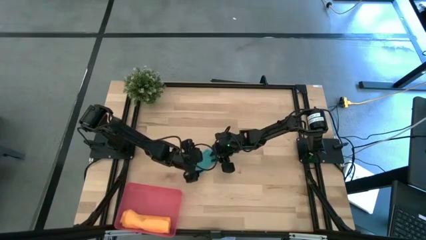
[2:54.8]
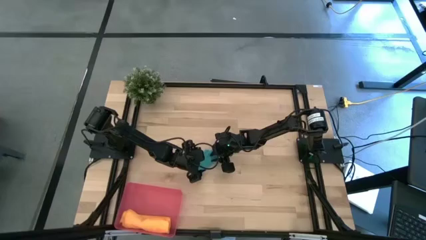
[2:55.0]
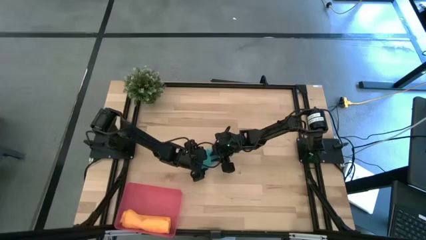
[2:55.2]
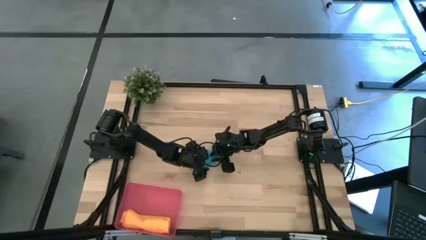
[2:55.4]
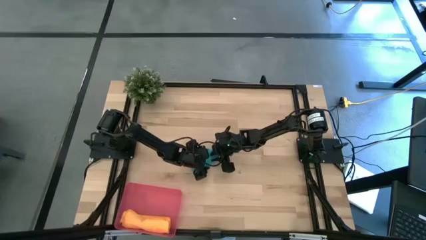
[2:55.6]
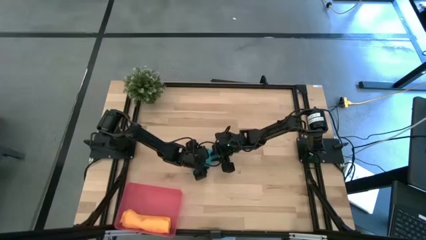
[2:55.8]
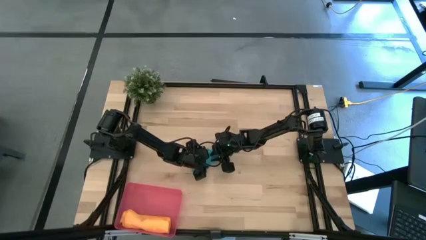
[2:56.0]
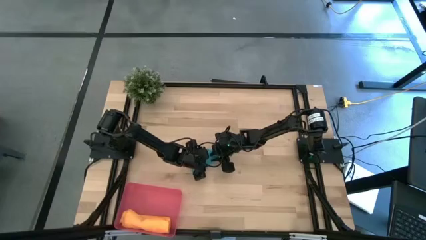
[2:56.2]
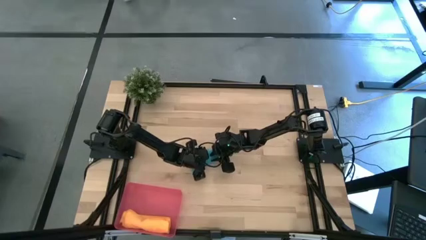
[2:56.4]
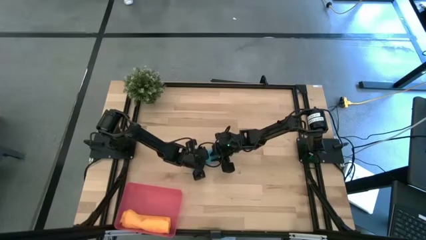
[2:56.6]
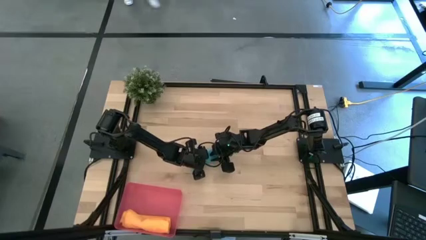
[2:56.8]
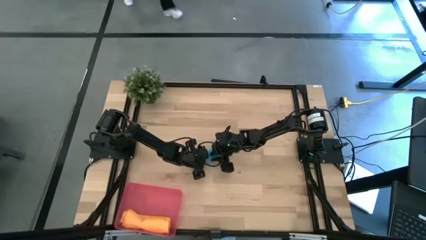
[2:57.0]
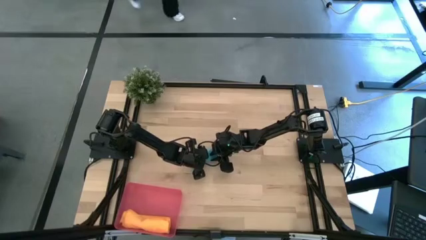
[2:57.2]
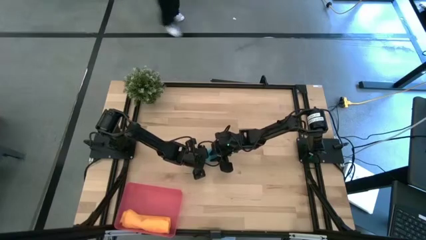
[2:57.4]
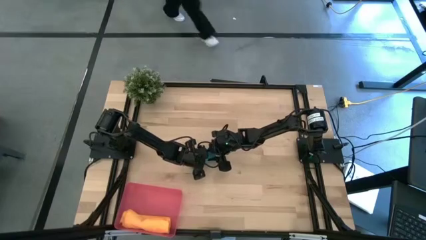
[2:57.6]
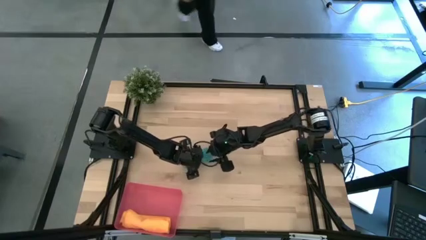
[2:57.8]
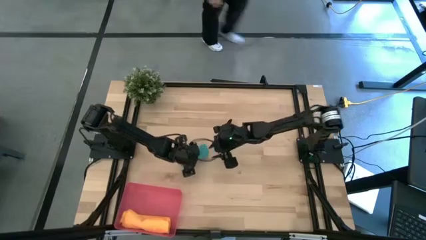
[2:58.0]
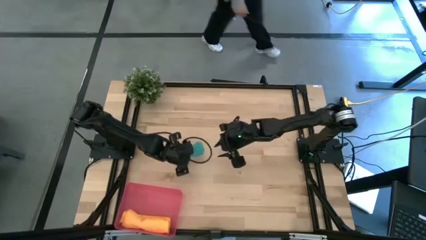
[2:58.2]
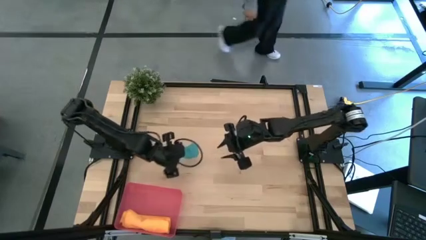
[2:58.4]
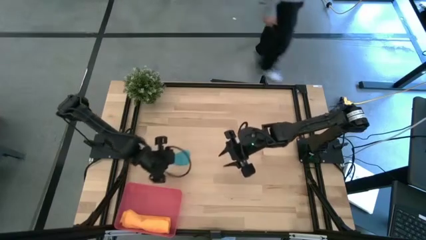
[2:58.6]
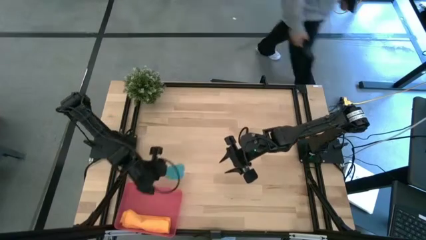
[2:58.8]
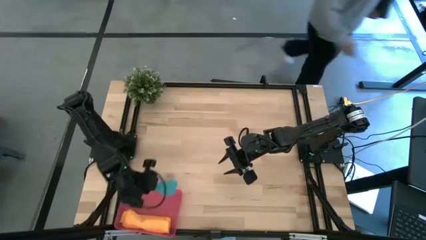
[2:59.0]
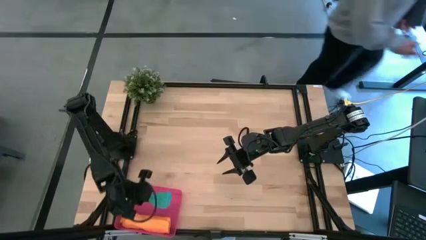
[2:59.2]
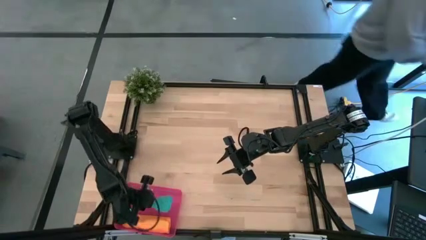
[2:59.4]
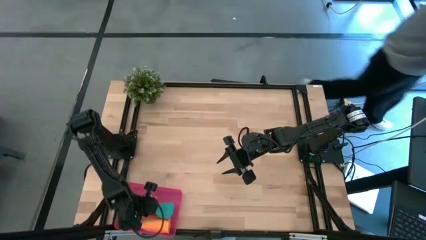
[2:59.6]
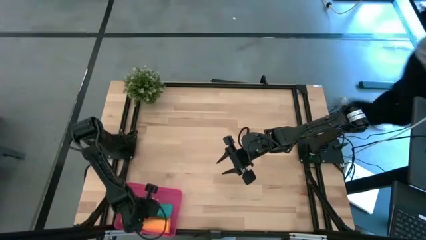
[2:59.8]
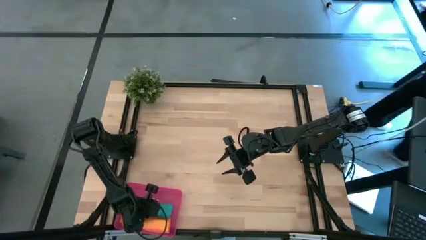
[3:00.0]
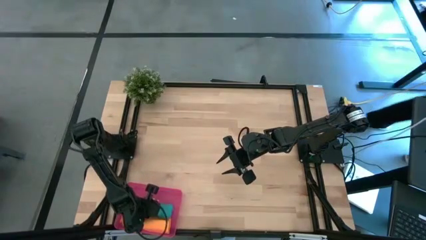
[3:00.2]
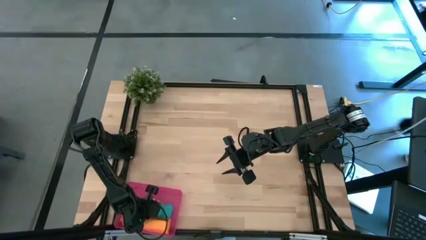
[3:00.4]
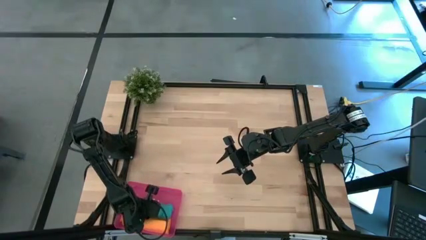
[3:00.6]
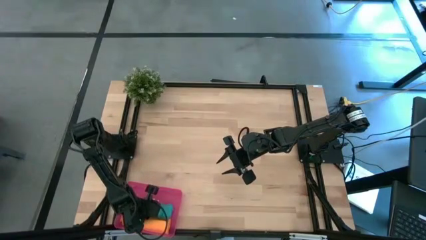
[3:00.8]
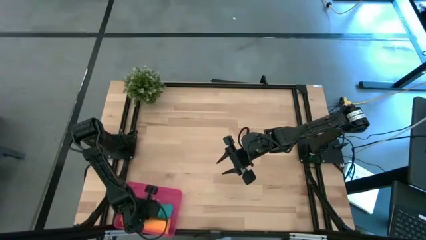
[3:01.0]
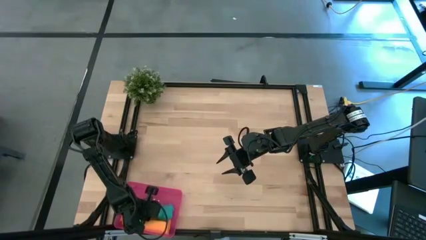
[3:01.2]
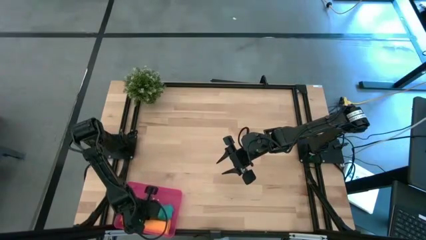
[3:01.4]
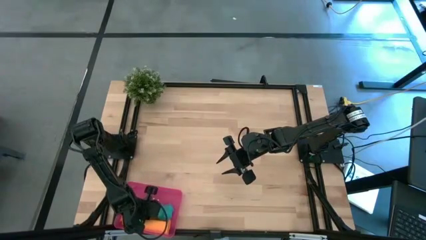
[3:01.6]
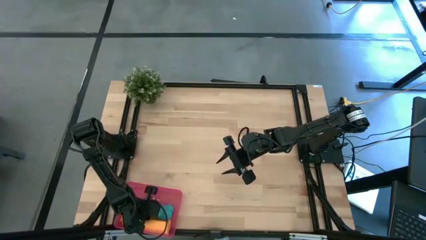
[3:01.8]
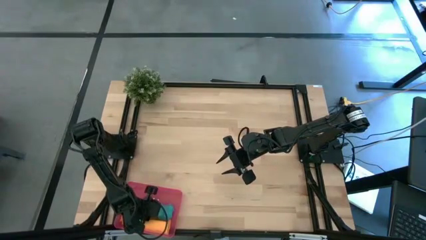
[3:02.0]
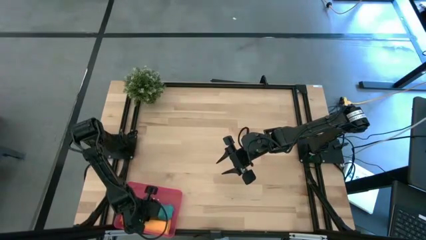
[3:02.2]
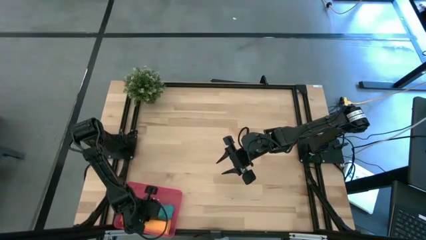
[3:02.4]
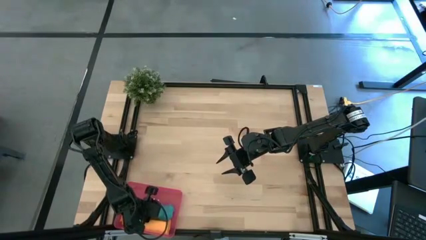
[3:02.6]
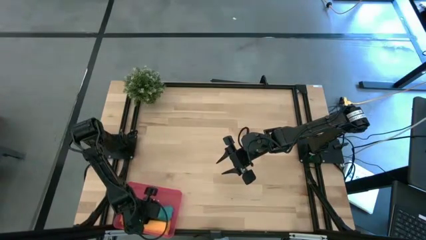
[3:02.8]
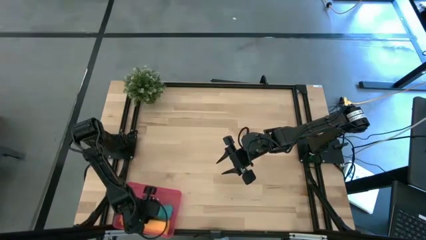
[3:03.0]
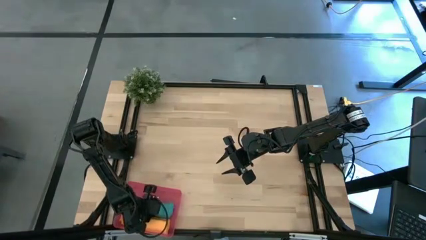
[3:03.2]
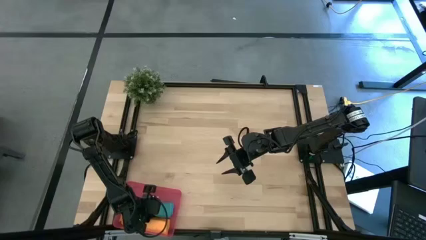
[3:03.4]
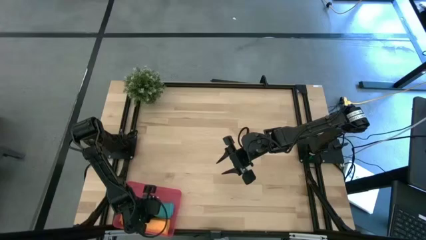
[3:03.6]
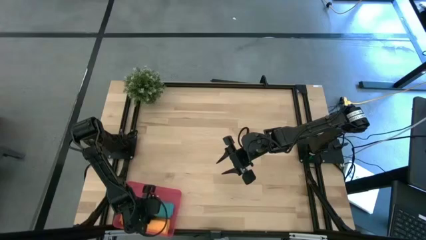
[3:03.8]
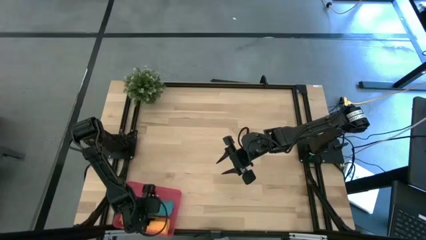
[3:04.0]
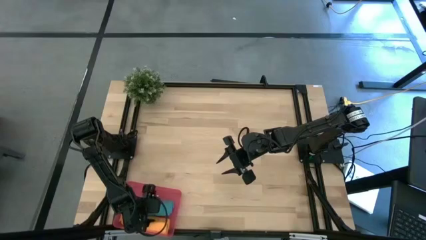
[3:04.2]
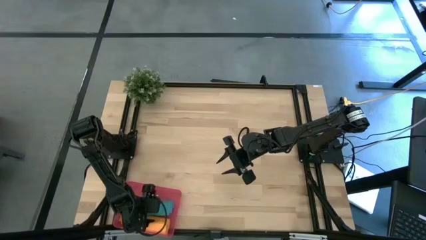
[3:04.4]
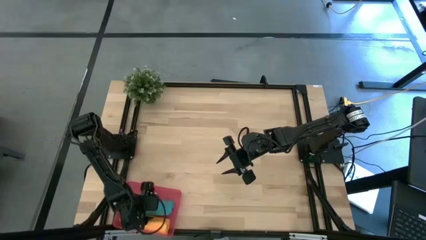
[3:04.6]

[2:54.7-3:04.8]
Task: Roll microfiber towels into tight, uniform cylinder then place into a basket
Put the blue microfiber cloth into the bin

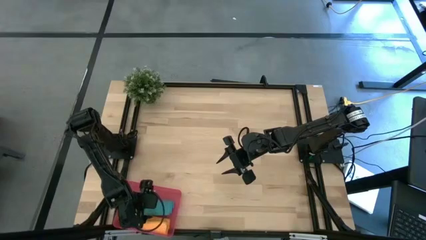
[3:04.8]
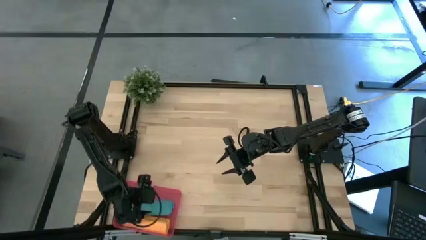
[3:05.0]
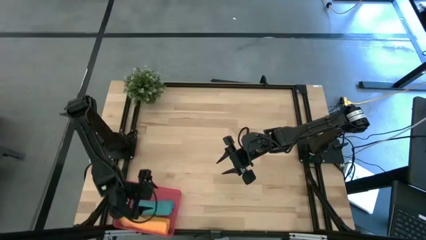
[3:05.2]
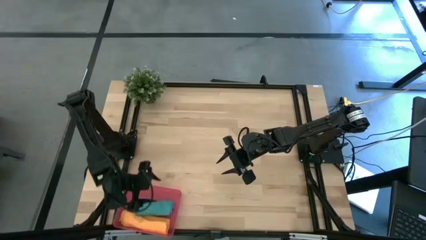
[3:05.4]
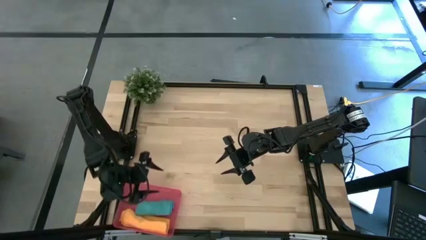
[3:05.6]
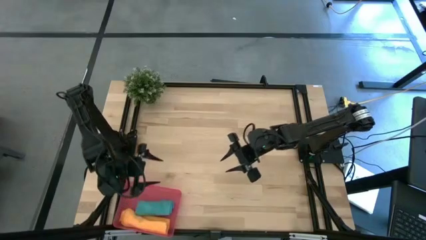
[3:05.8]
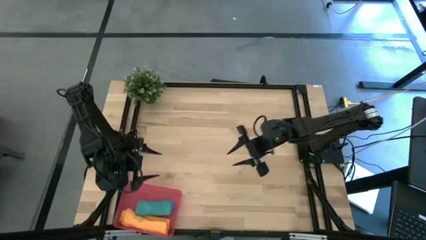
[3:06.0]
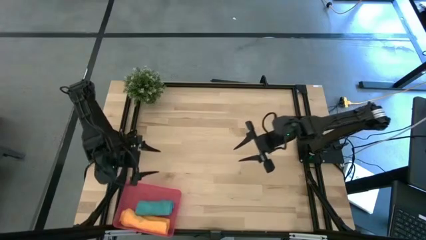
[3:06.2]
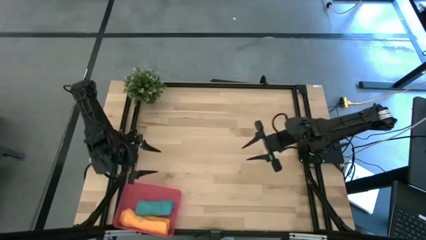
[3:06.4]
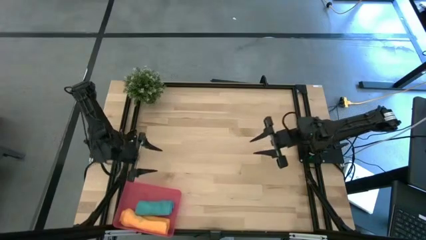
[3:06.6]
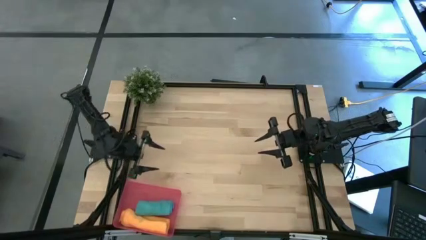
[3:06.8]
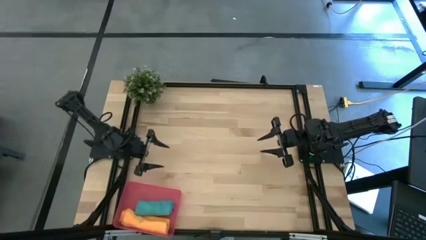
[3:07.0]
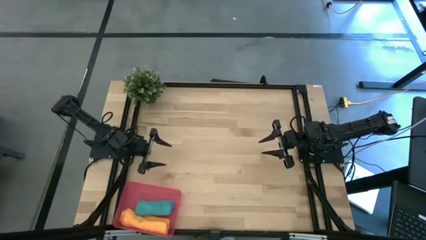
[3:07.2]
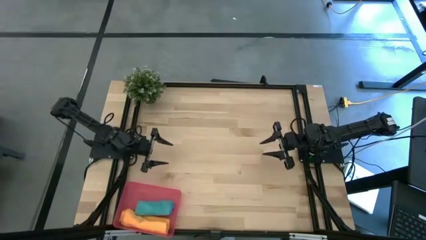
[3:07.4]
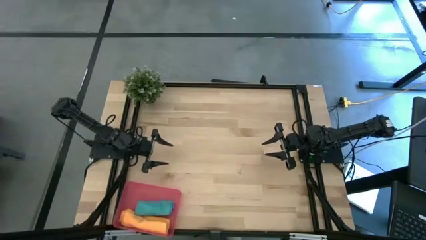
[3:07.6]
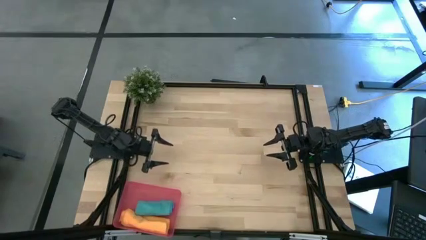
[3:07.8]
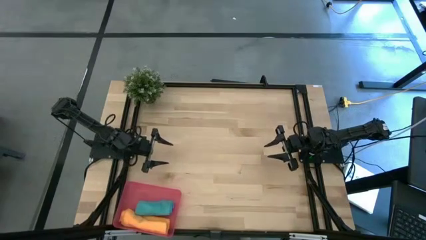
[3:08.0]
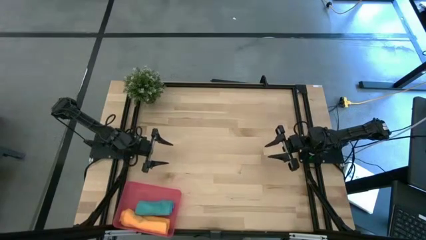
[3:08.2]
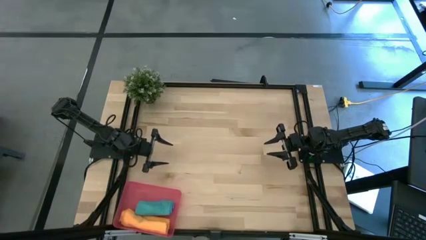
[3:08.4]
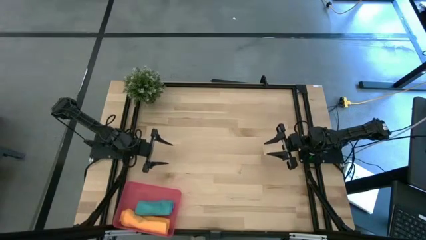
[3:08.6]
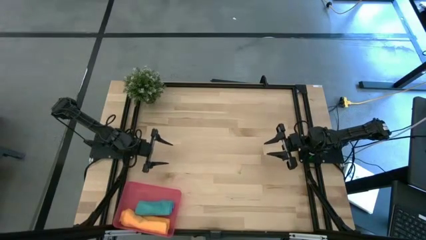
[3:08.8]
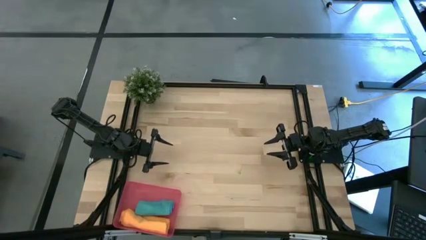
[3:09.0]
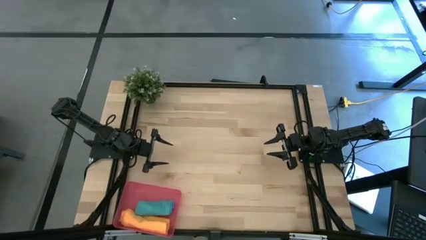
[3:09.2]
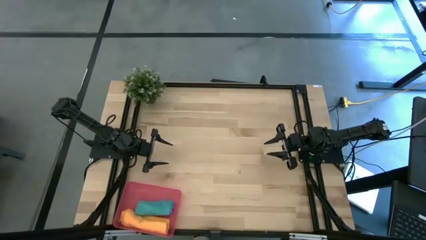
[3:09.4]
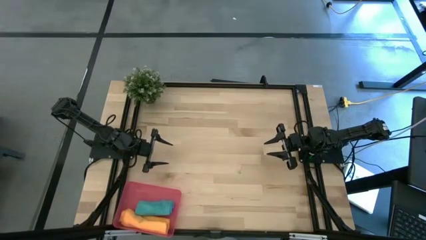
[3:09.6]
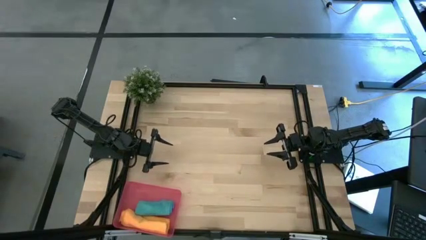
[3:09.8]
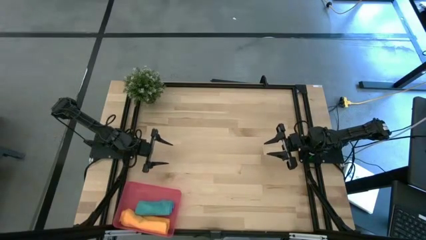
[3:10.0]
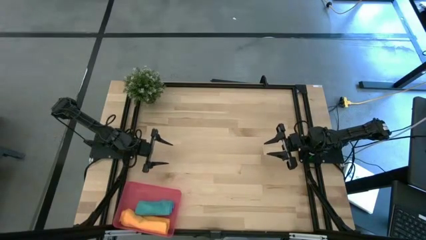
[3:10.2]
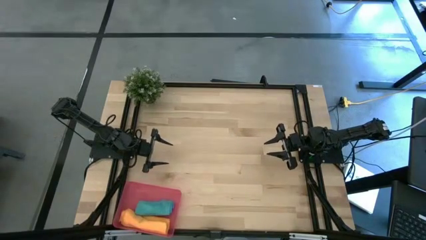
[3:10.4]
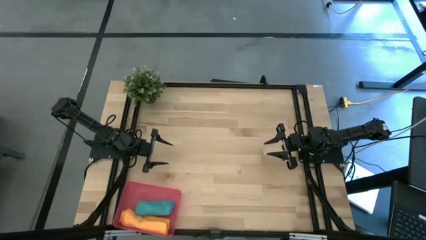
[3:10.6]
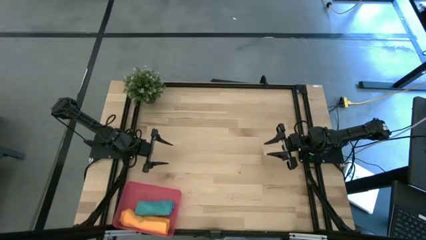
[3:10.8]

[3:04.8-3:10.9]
Return to Home Position
